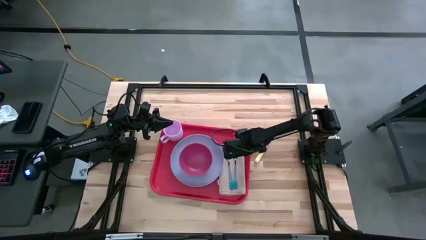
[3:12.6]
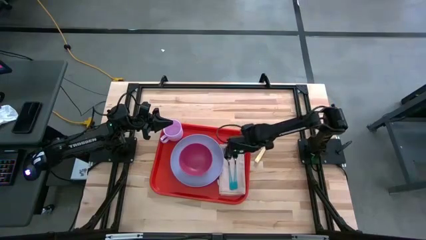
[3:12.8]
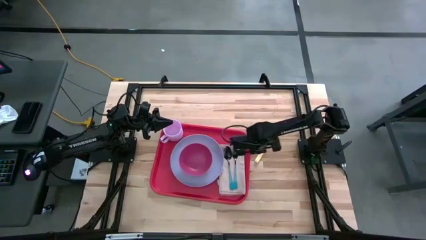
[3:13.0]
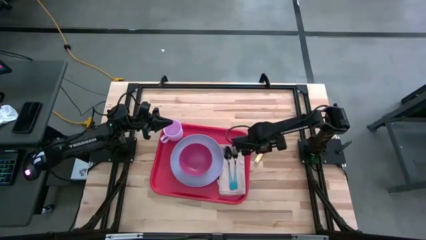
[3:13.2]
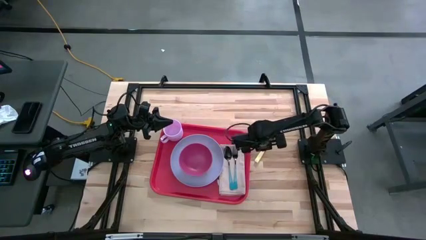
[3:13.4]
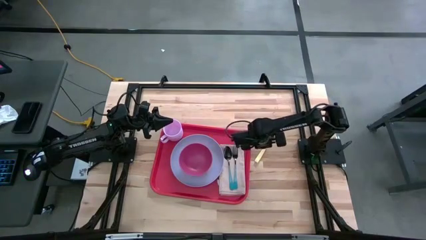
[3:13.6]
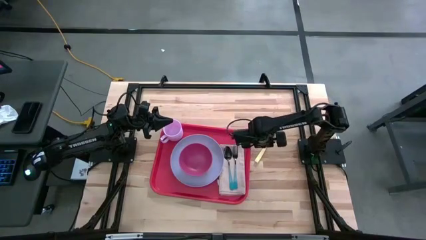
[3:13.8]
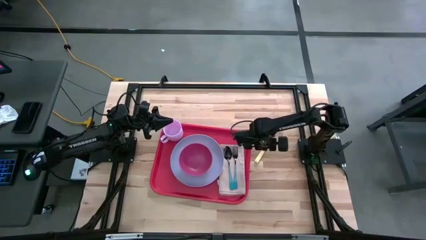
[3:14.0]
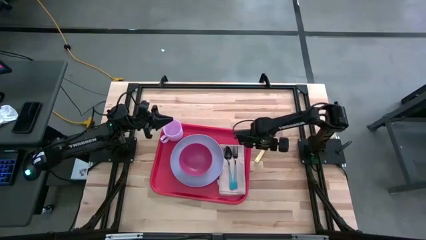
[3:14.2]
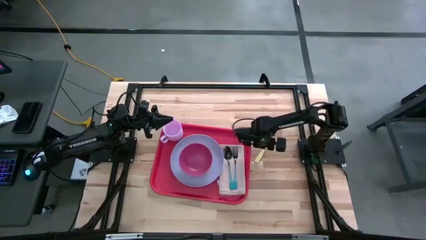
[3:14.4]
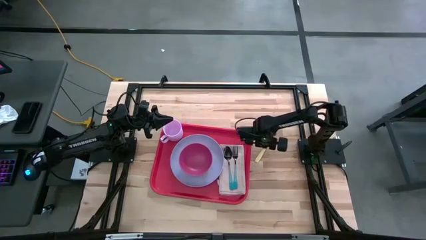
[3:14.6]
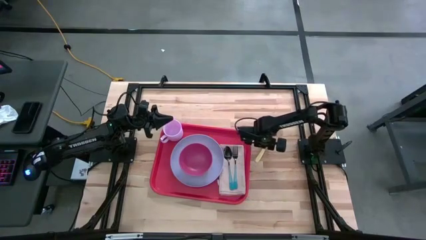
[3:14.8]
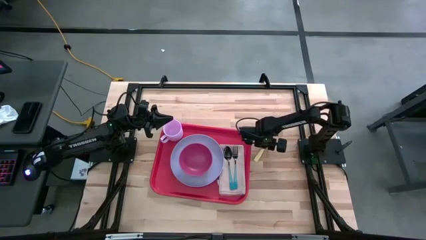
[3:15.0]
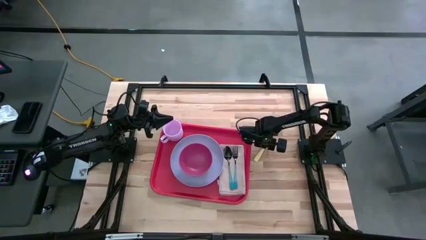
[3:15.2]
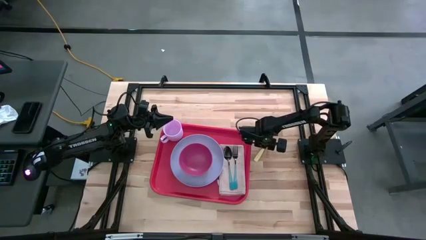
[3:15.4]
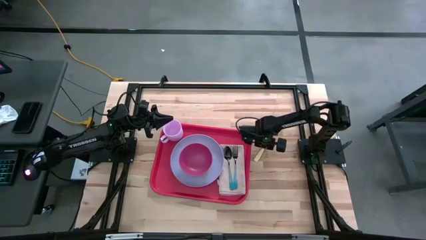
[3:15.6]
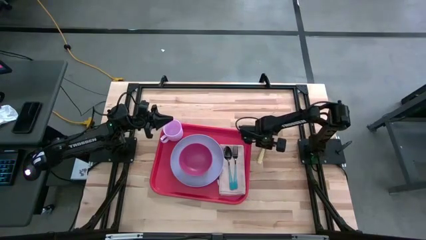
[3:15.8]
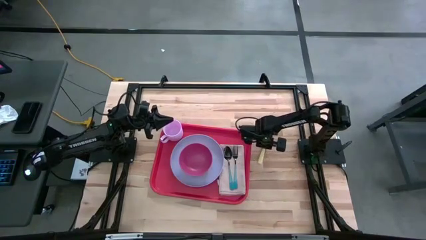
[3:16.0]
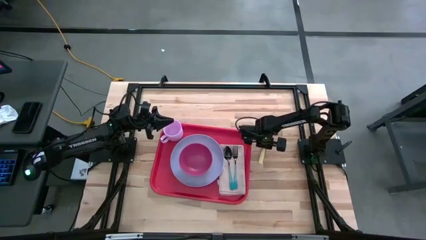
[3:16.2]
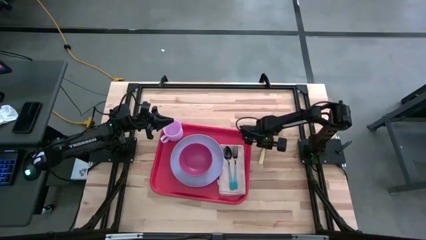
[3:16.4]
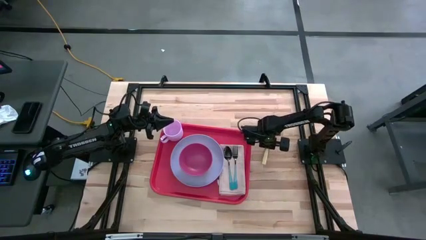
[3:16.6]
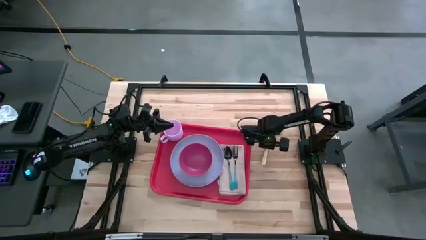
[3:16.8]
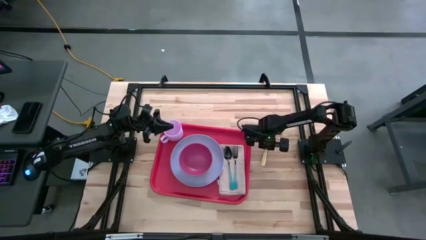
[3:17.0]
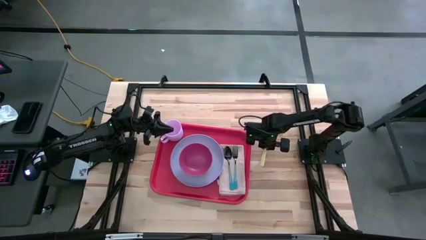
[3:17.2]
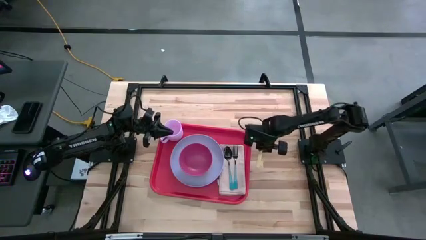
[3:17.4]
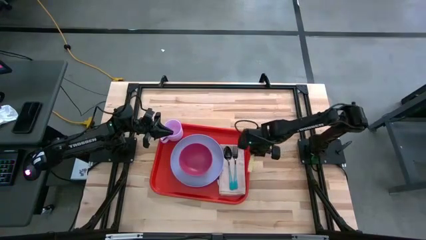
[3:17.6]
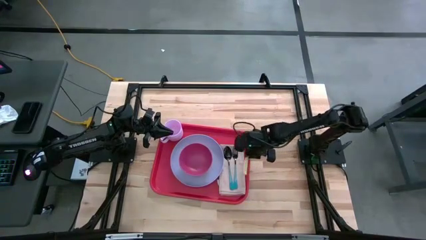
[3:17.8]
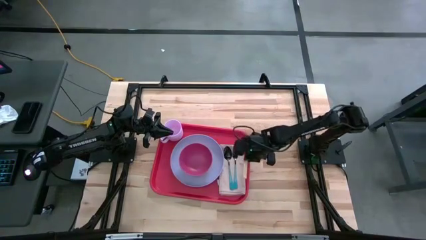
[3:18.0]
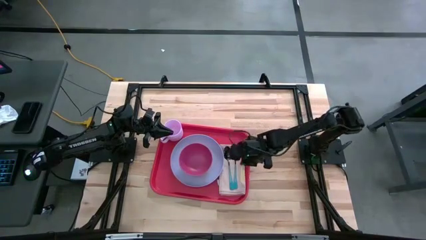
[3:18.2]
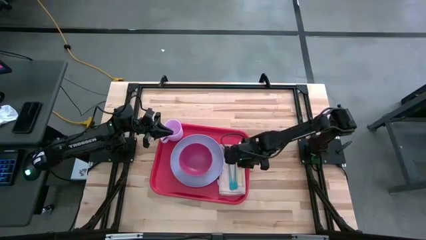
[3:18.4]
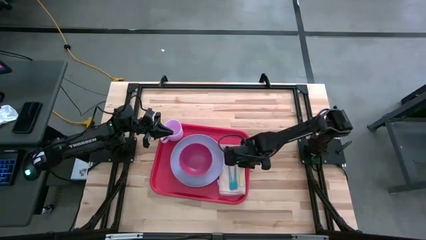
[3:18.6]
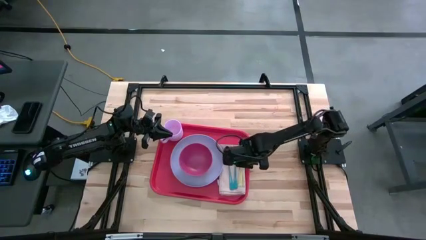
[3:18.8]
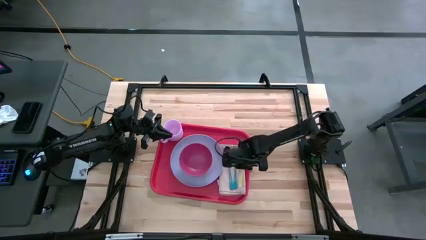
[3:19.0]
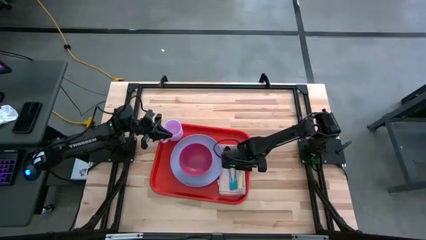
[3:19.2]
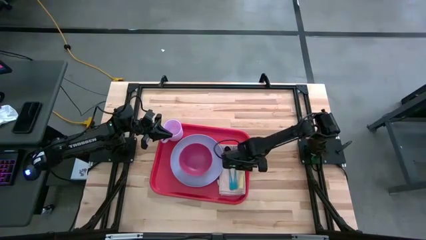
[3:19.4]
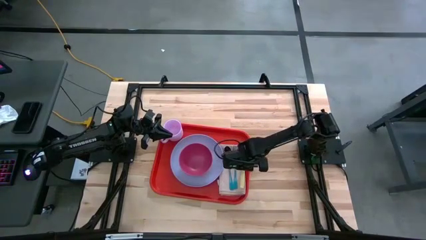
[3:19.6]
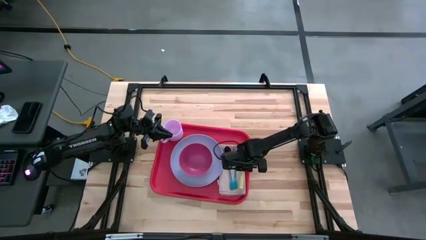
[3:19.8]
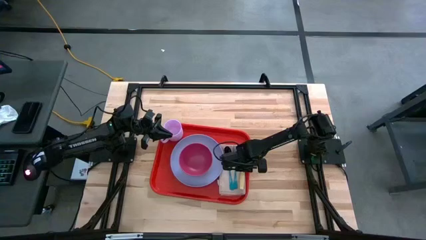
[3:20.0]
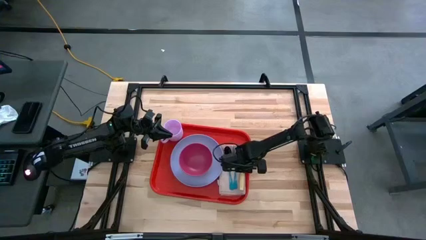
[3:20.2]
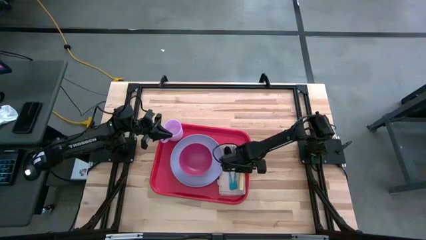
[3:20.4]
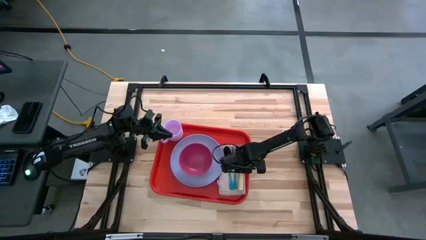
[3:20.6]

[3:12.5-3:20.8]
Task: Set up tray
Put the yellow knife on top of the gray napkin to the right of the blue fork

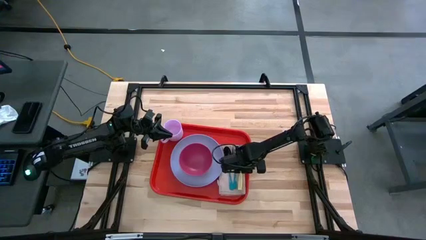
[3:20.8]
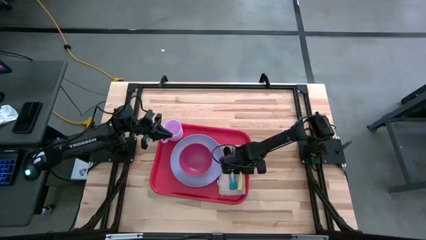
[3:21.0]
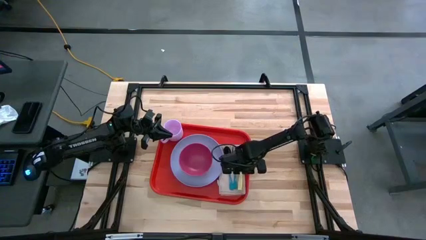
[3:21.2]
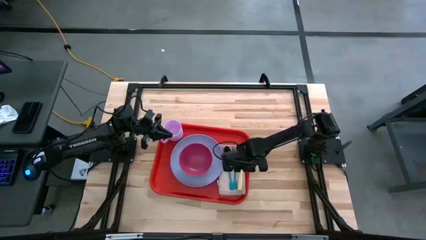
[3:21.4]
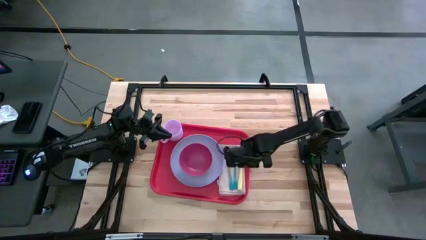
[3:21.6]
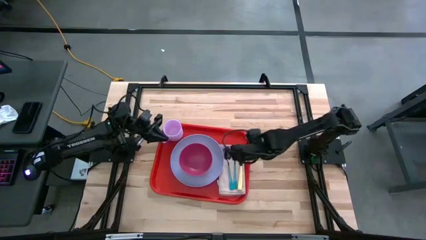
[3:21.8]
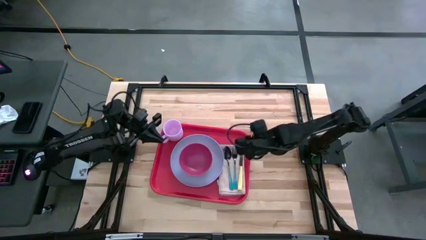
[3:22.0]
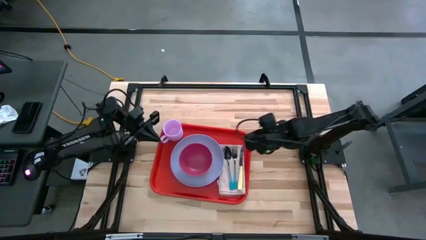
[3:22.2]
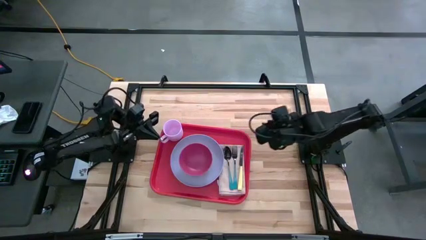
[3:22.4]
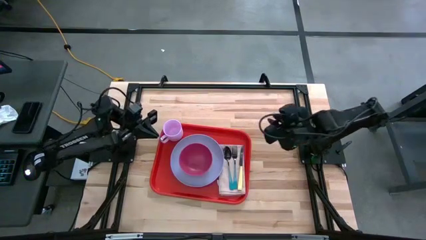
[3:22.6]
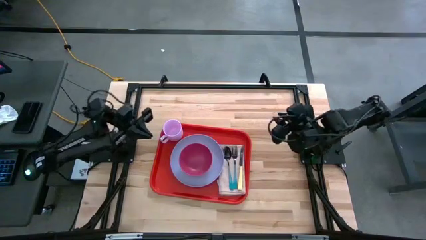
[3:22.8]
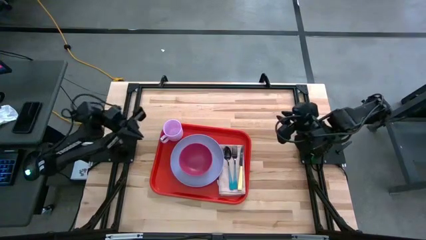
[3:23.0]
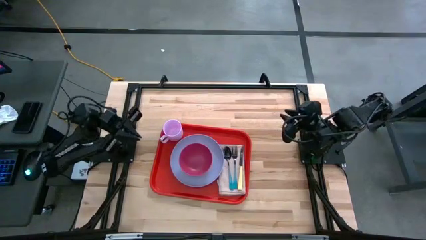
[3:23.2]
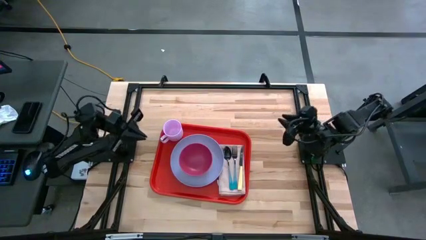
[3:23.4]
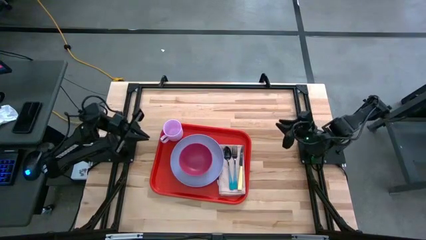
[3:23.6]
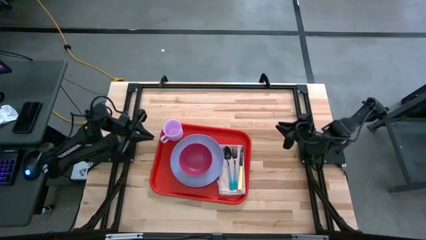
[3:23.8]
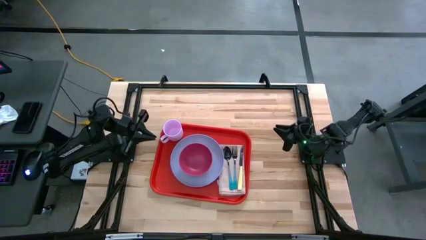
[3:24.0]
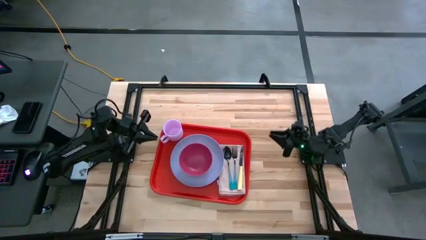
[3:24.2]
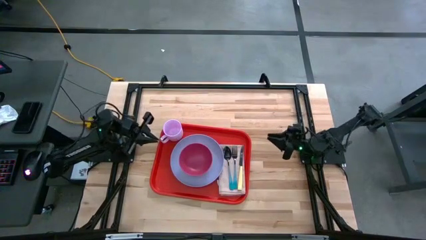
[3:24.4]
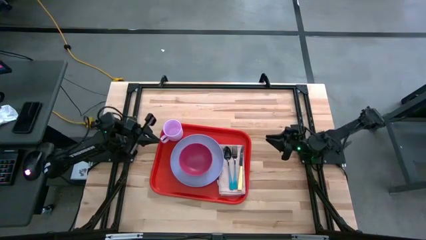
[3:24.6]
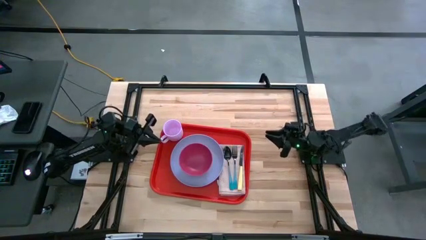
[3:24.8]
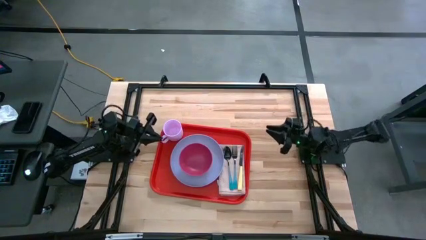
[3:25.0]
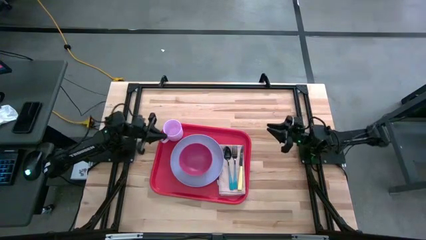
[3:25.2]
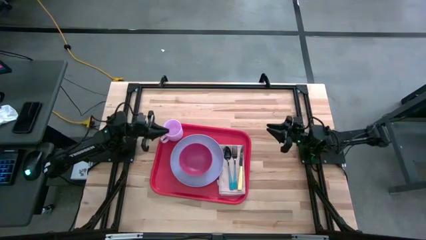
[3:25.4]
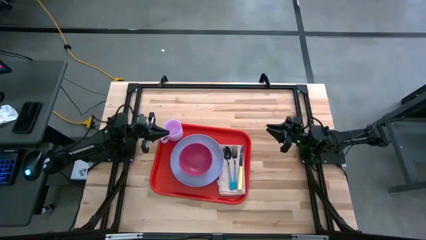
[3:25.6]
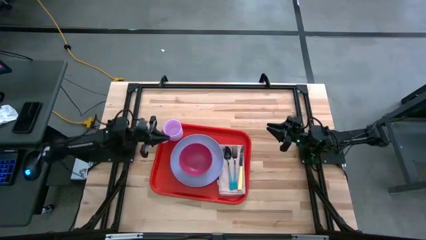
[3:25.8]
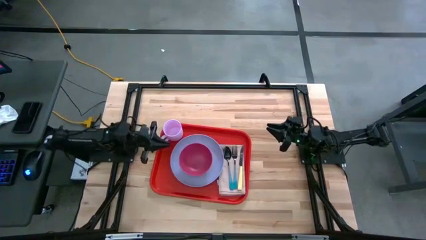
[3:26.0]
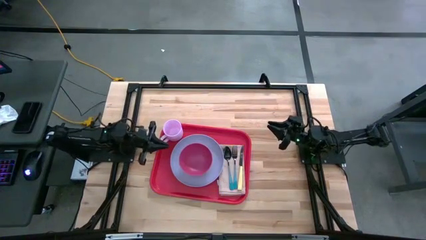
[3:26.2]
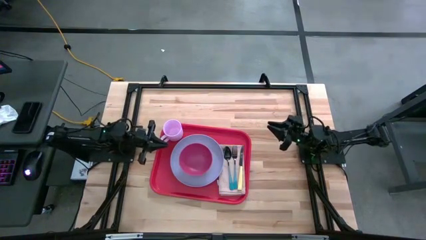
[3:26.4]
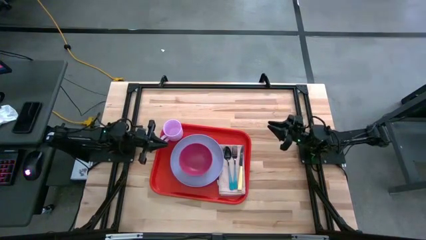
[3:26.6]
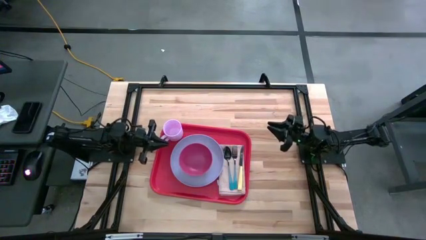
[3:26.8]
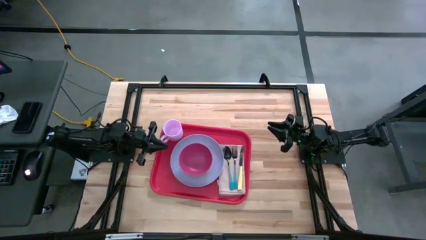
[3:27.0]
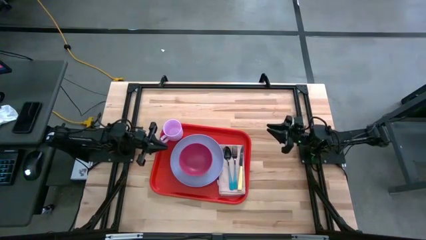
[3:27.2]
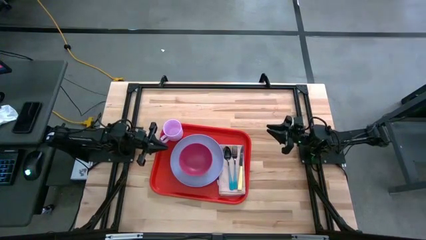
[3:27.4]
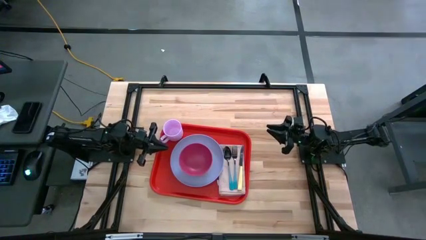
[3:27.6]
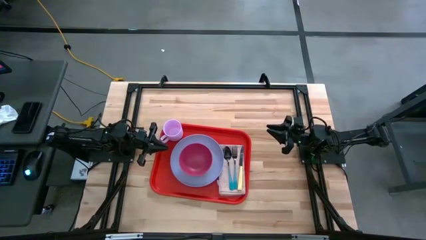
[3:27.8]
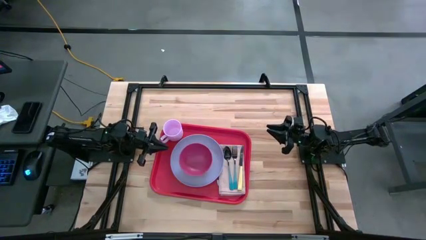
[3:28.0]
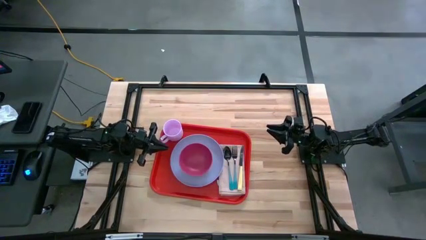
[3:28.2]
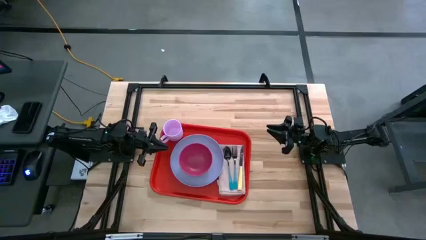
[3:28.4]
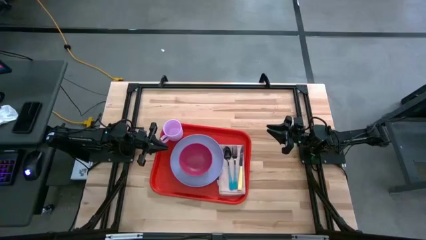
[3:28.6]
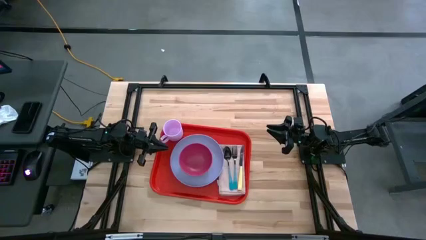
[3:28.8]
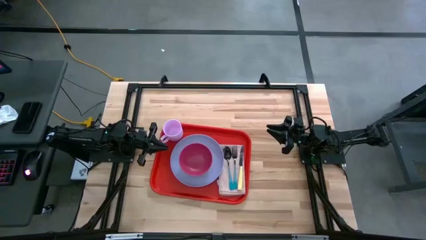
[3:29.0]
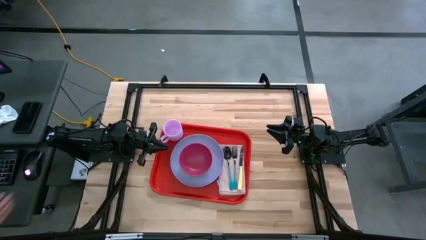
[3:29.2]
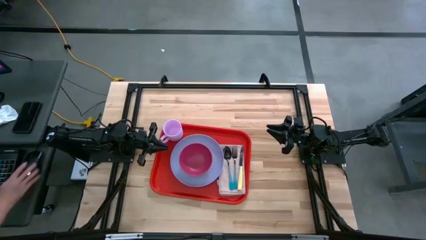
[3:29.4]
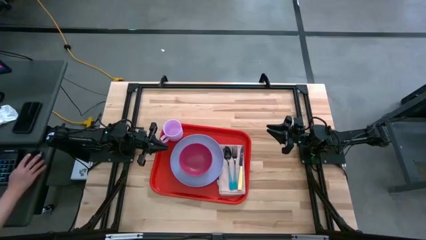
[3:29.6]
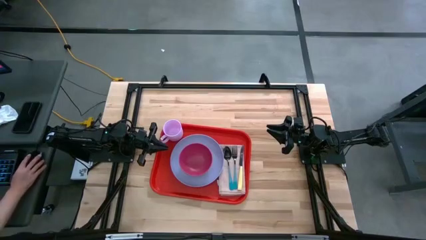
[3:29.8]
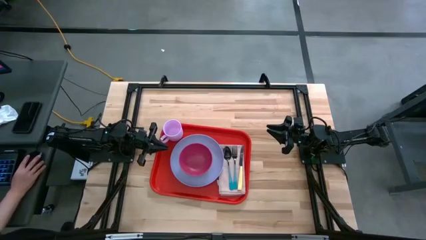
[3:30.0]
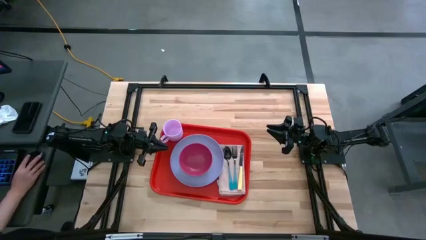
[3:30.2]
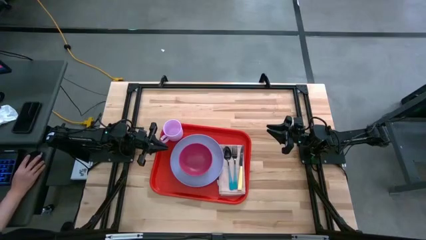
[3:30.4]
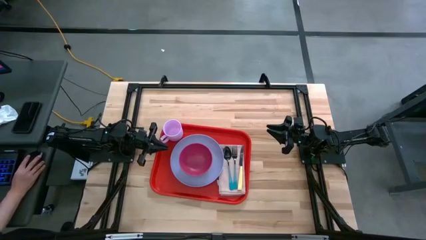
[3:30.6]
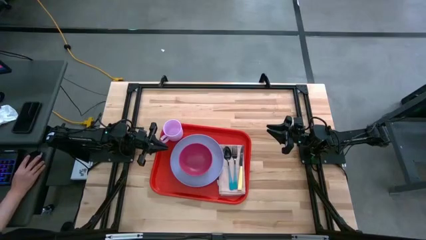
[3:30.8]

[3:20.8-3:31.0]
Return to Home Position
